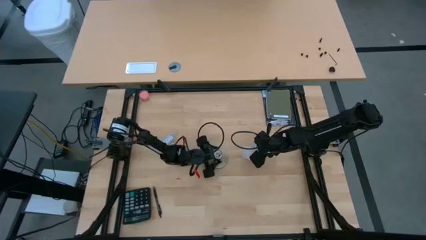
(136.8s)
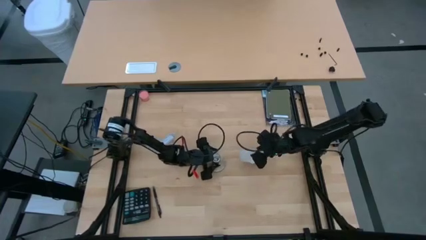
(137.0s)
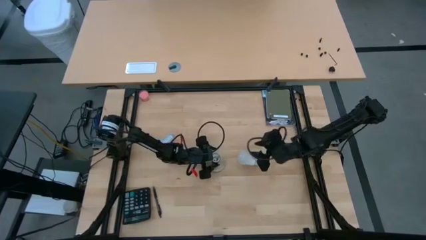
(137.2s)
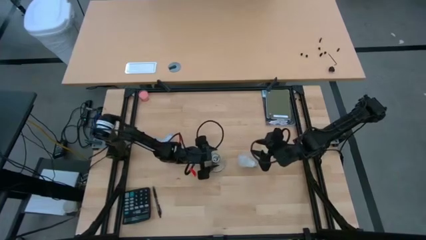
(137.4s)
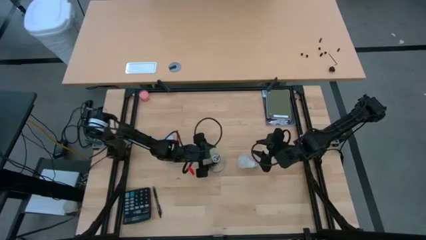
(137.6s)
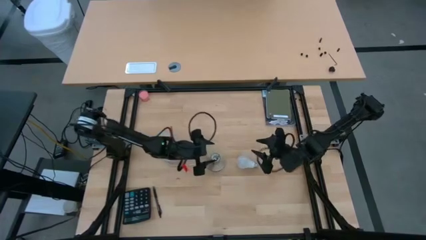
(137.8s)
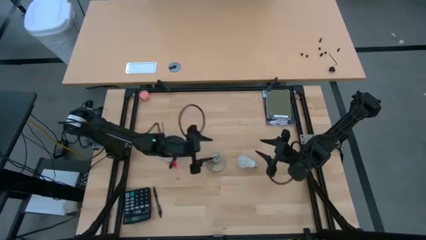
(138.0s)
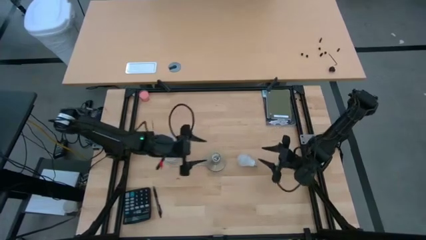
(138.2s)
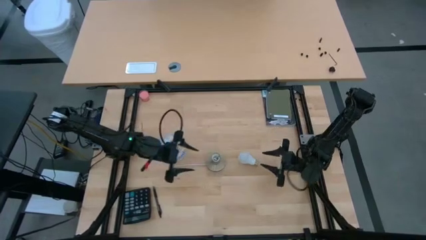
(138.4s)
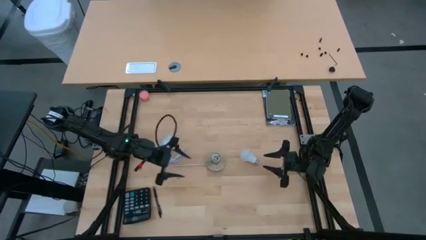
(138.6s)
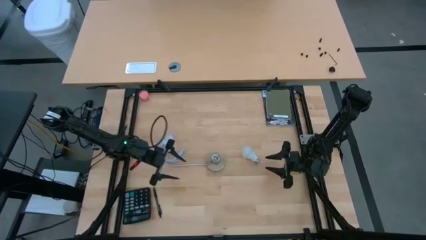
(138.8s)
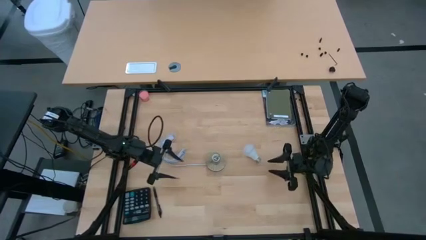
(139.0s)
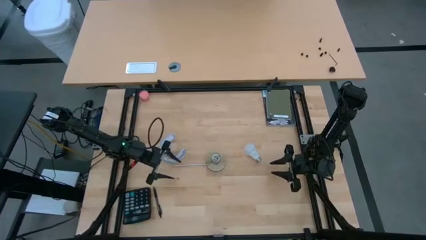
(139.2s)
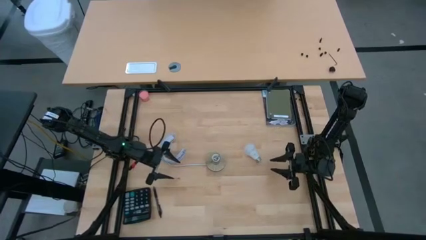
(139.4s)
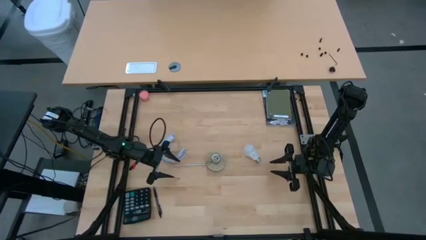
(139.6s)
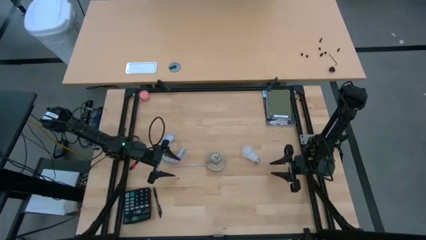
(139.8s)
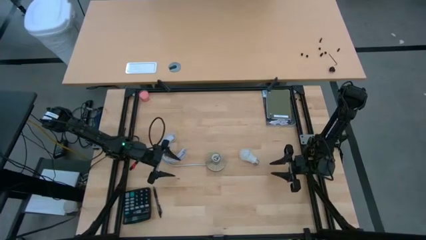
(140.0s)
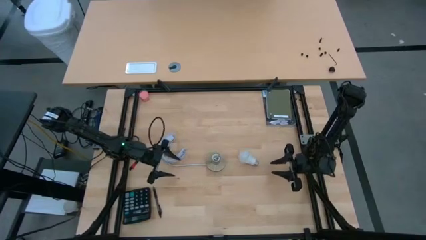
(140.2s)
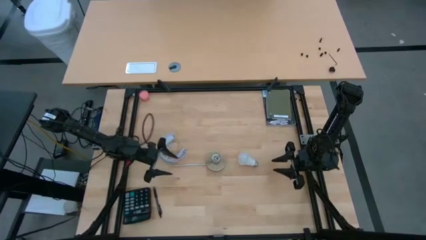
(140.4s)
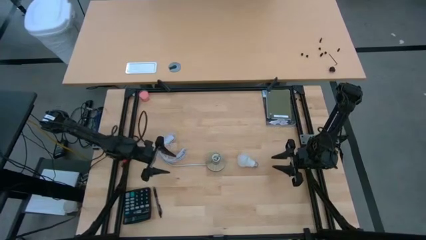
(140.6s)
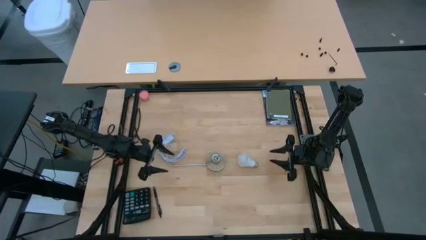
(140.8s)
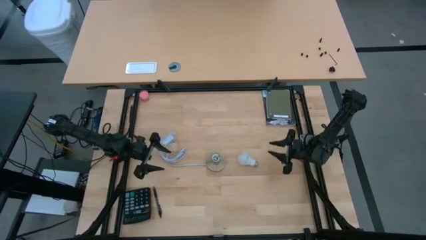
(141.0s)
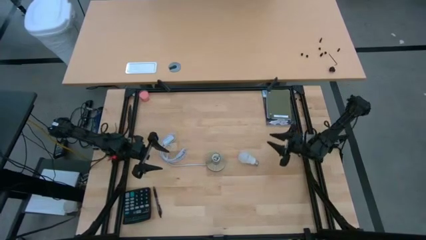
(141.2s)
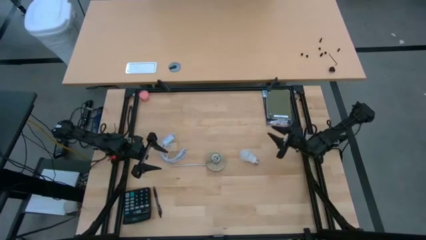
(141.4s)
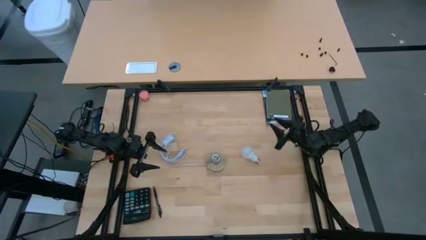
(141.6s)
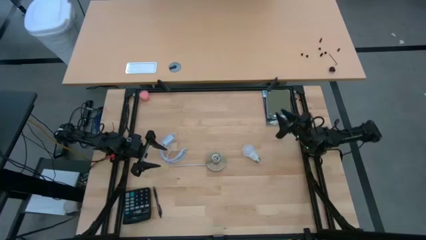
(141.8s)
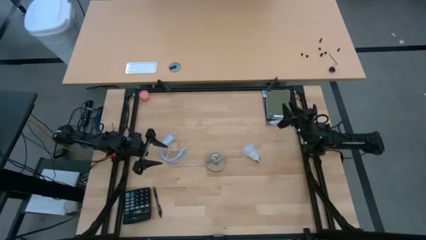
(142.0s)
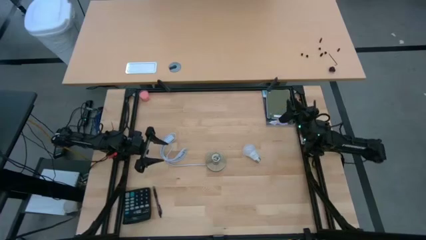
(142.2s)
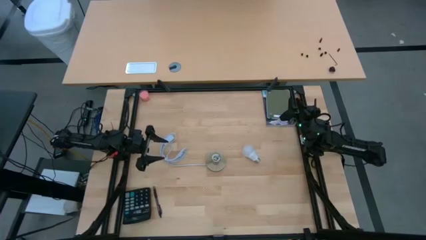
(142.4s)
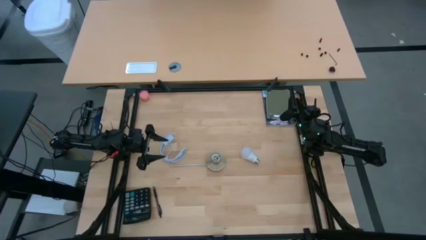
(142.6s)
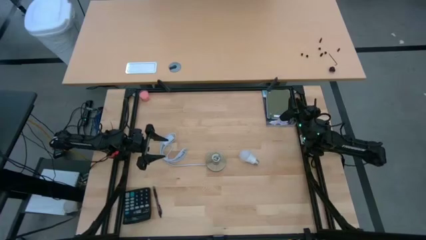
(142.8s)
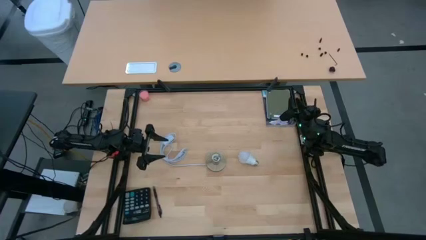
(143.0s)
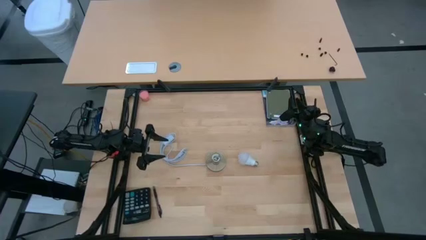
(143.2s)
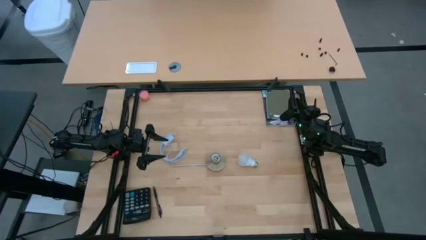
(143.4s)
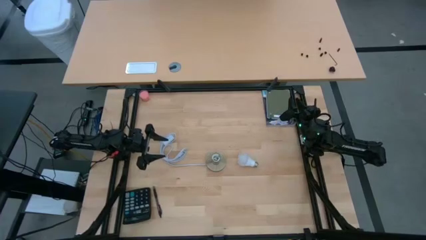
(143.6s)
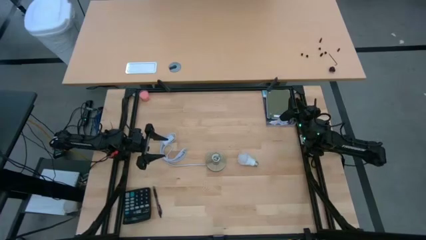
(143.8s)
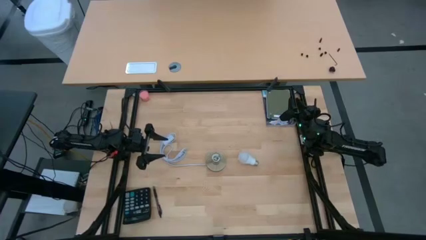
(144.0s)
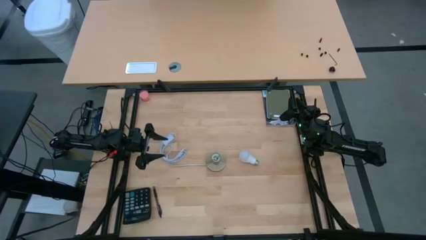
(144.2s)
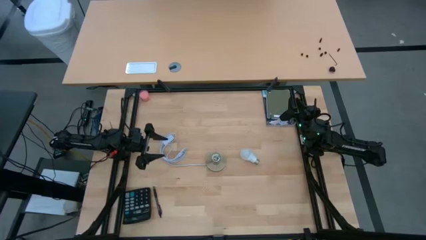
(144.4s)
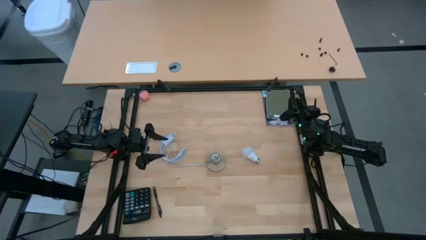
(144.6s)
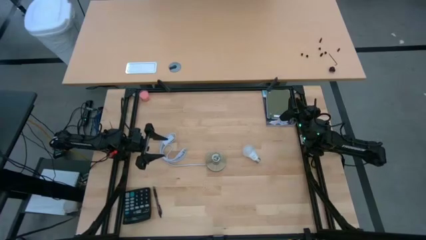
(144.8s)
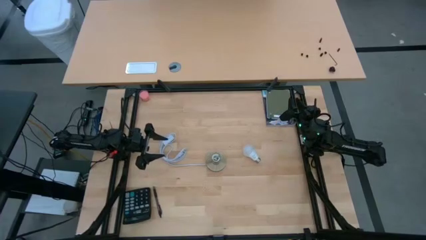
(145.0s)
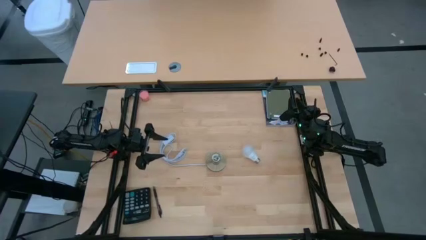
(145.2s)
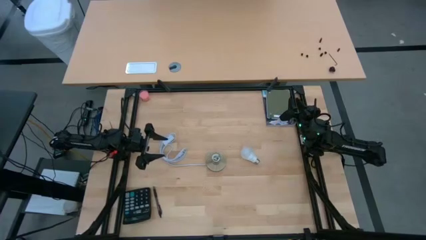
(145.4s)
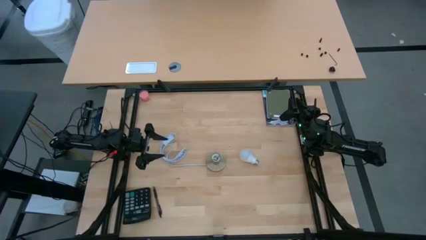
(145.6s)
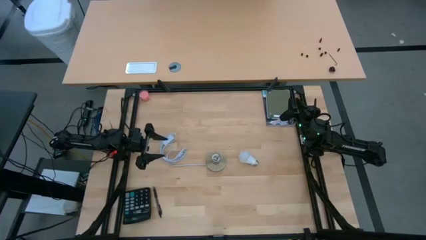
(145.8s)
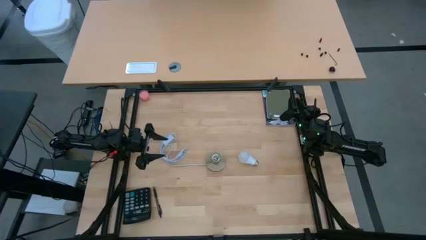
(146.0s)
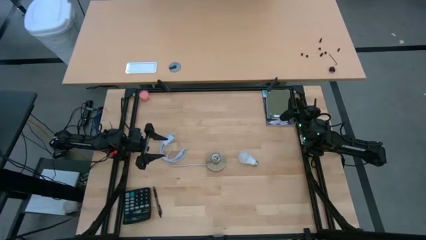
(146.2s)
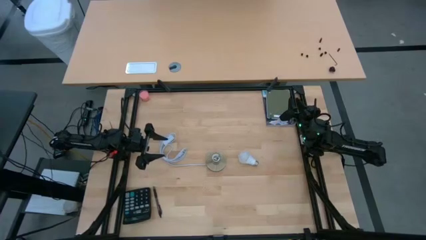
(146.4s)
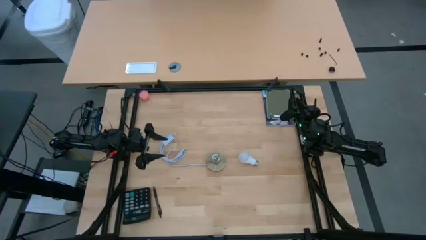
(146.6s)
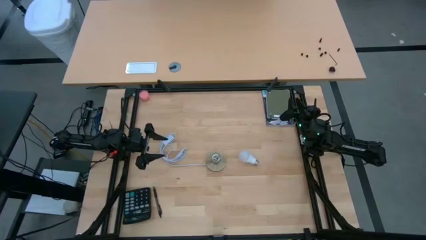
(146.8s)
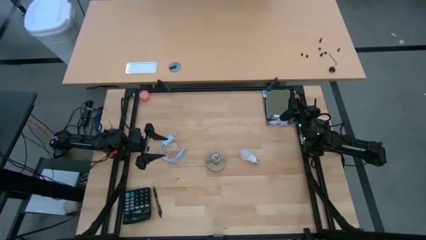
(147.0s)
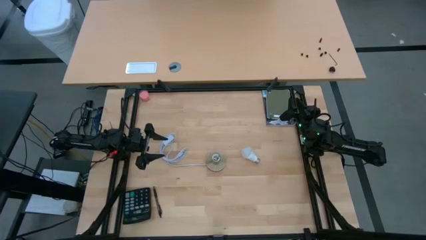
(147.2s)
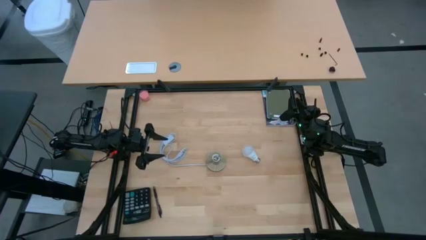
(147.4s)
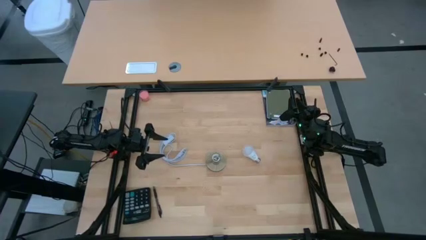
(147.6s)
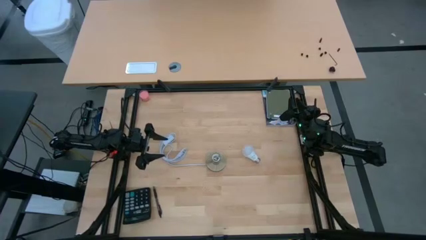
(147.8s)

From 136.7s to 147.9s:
Task: Screw lightbulb
Return to Home Position

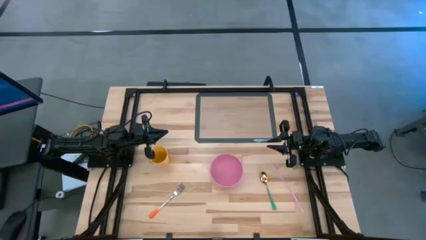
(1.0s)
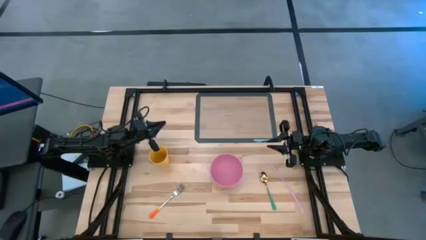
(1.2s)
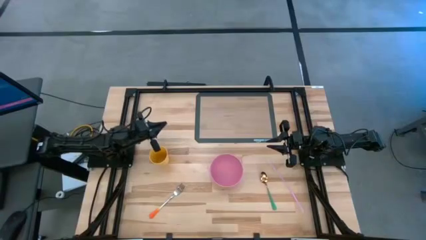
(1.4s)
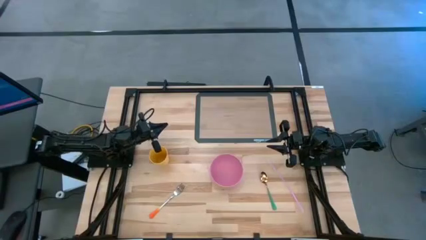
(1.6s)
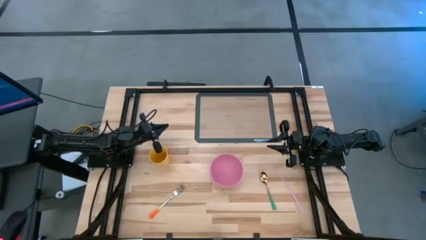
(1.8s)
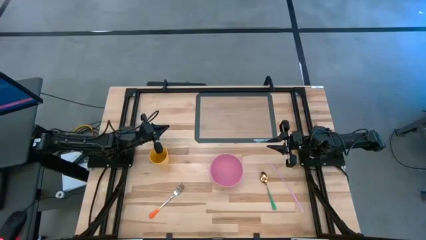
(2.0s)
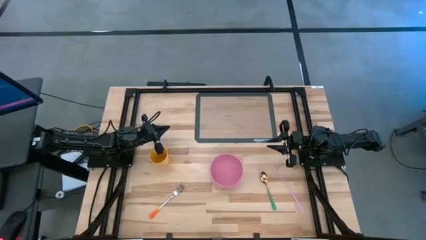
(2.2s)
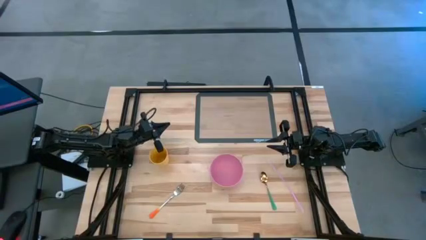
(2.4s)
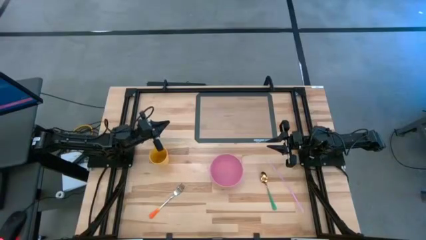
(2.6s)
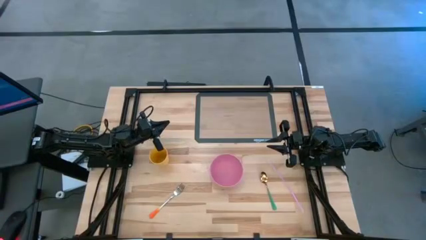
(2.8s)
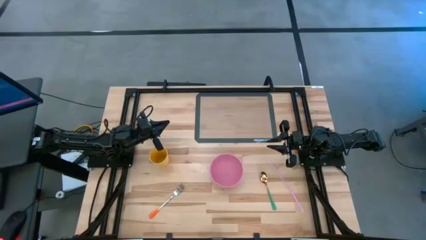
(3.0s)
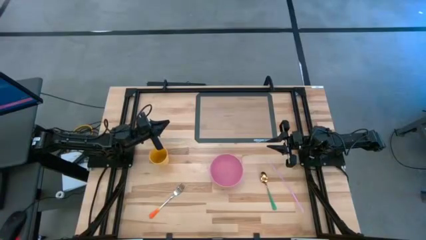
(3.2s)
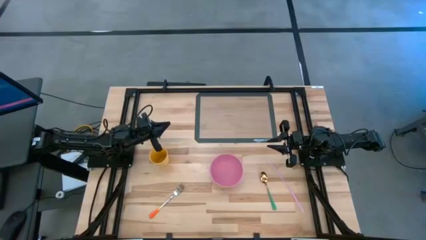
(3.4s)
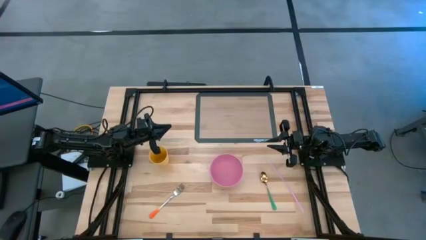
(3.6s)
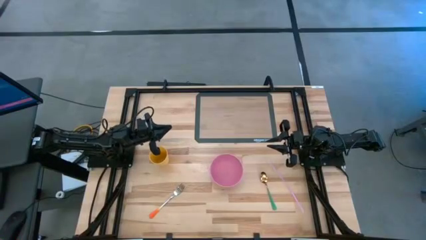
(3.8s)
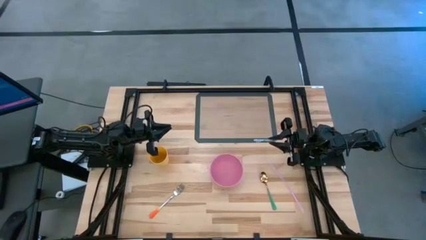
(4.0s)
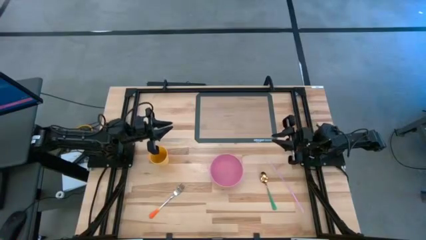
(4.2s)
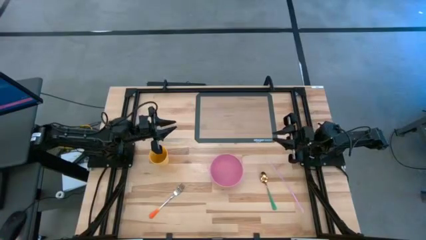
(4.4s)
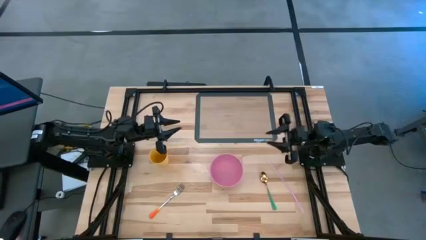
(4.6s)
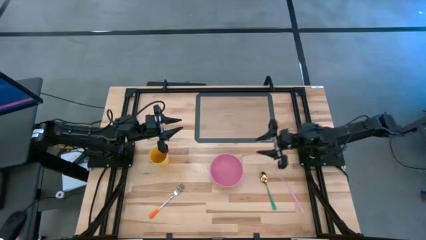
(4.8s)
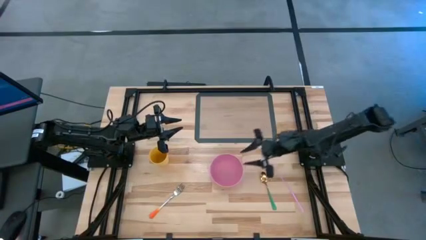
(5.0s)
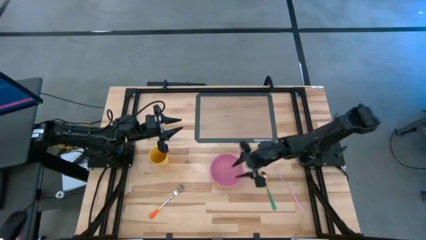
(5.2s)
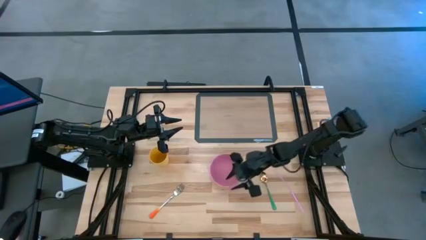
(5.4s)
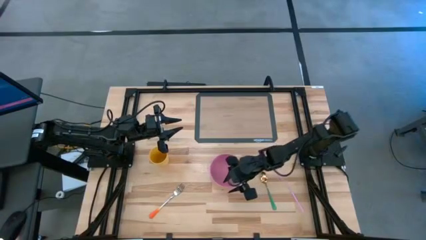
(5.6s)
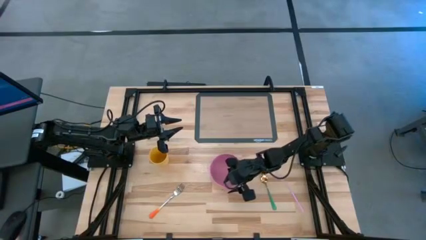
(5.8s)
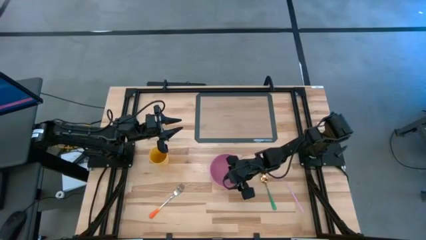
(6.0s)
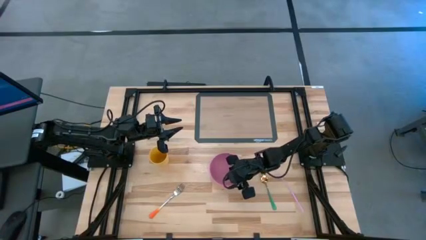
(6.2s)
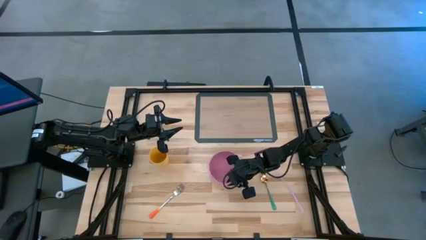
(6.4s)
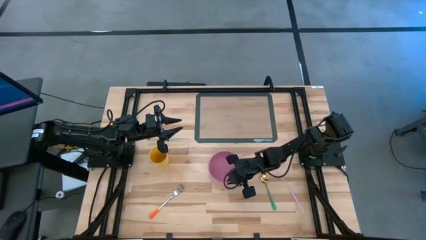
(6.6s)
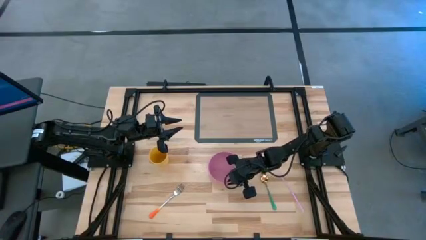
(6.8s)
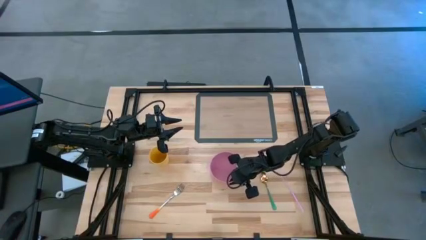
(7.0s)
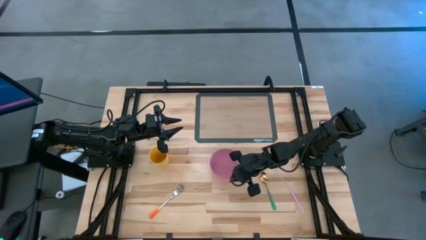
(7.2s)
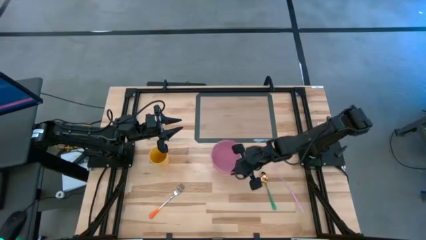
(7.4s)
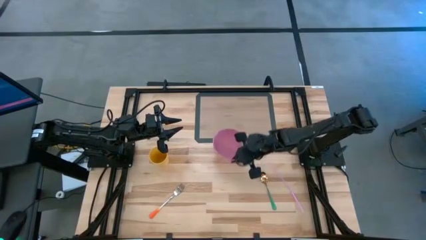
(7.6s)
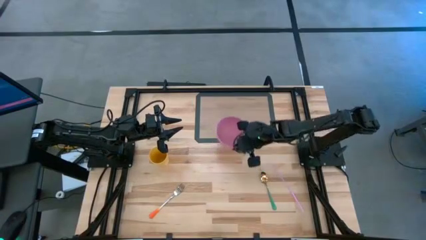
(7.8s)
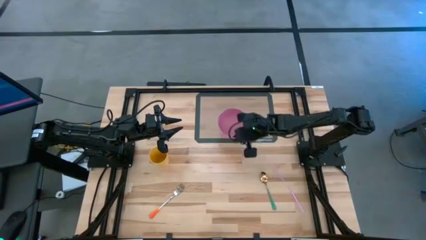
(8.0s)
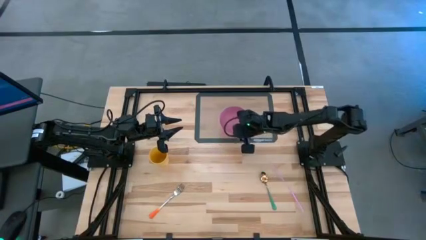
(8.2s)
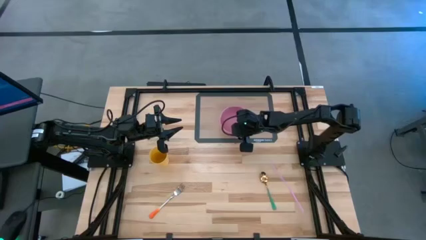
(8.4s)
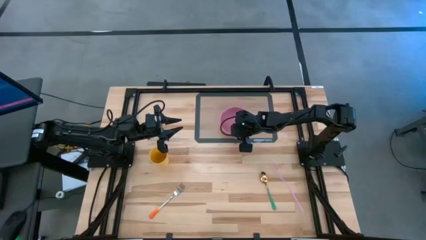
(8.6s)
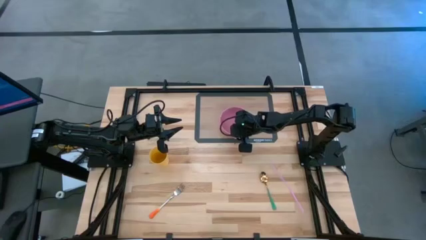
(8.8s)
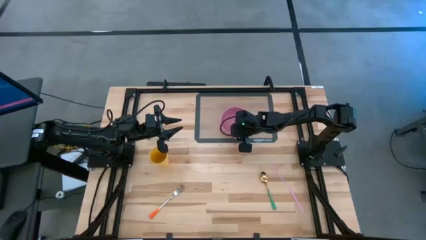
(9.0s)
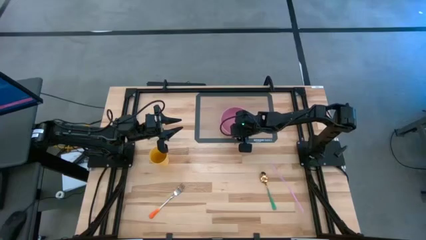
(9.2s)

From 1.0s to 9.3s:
Task: Pick & Place Utensil
Put the pink bowl on the transparent tablemat
